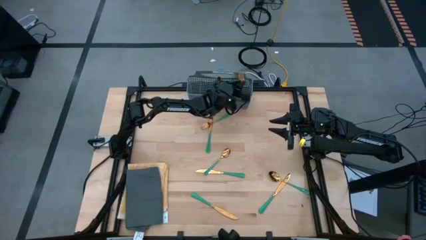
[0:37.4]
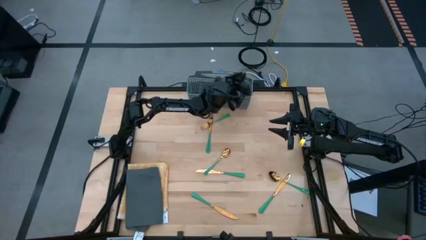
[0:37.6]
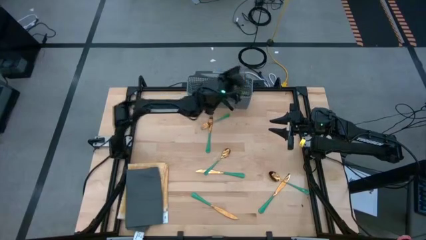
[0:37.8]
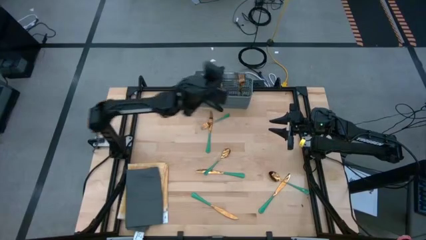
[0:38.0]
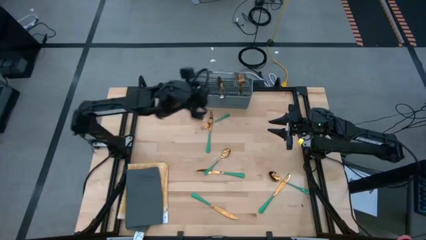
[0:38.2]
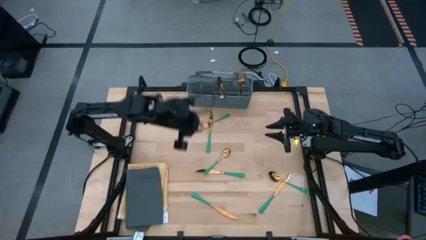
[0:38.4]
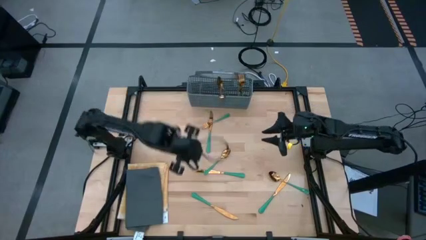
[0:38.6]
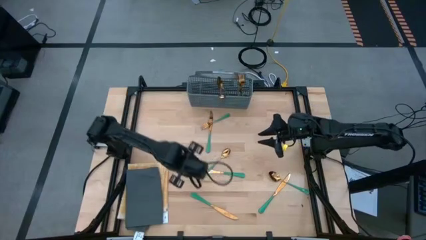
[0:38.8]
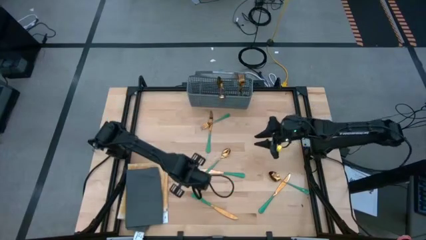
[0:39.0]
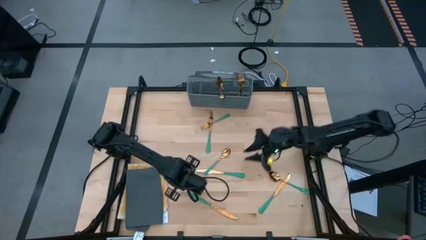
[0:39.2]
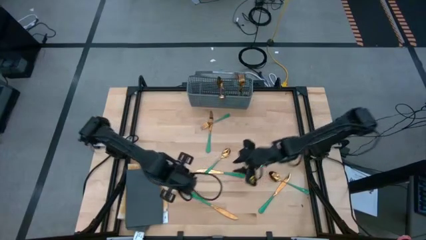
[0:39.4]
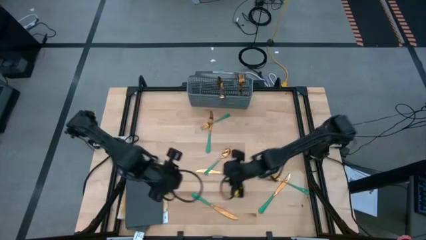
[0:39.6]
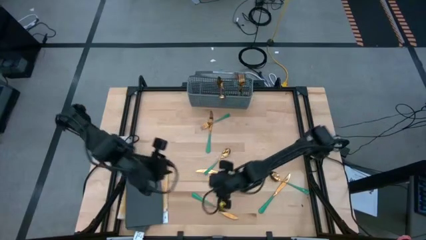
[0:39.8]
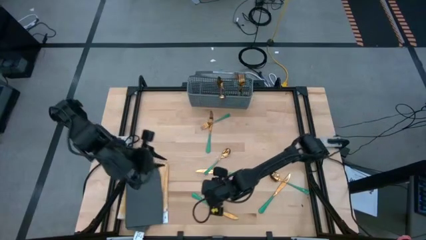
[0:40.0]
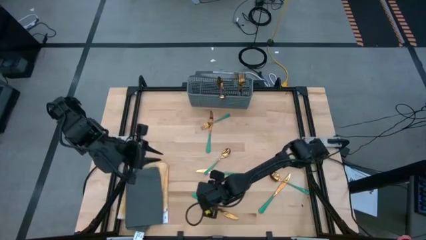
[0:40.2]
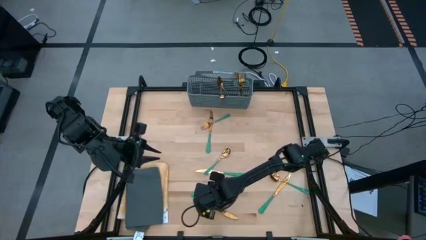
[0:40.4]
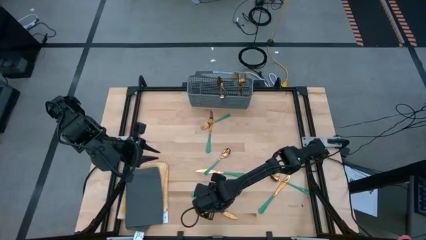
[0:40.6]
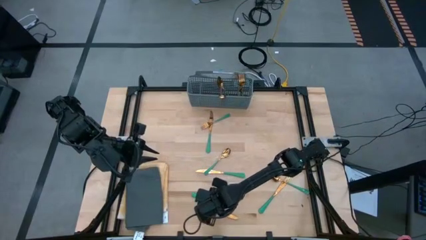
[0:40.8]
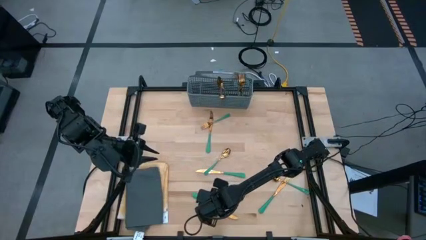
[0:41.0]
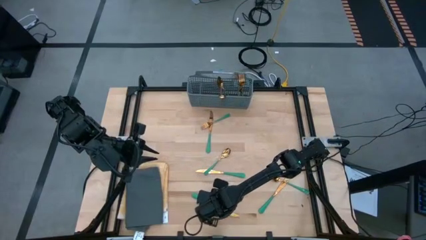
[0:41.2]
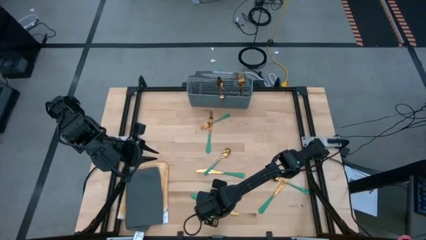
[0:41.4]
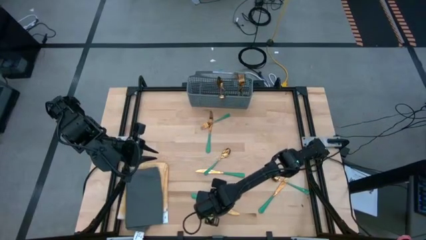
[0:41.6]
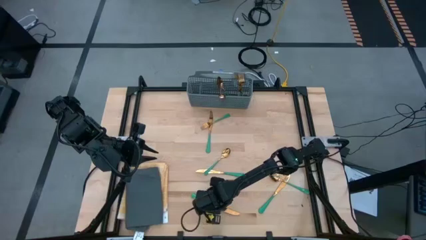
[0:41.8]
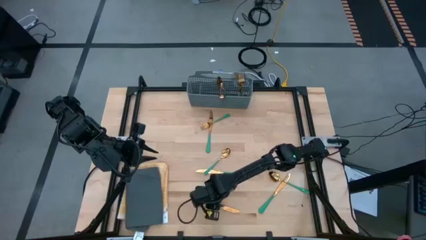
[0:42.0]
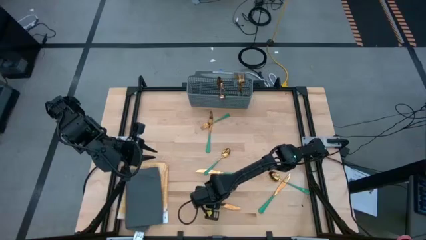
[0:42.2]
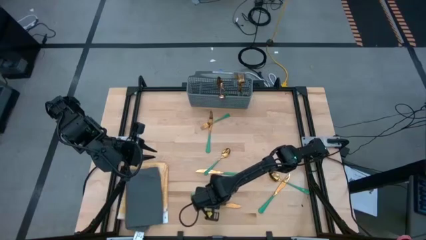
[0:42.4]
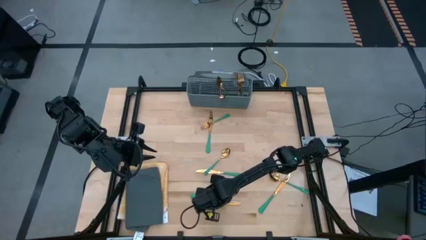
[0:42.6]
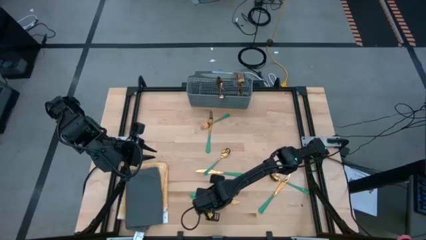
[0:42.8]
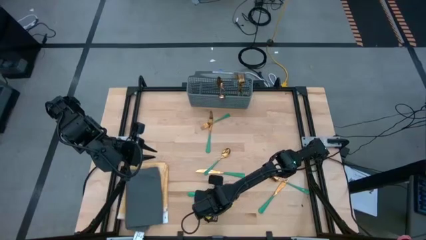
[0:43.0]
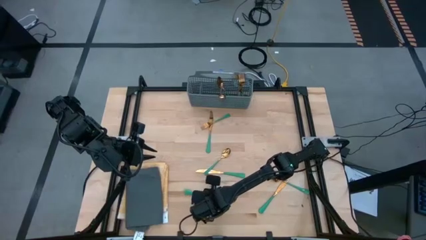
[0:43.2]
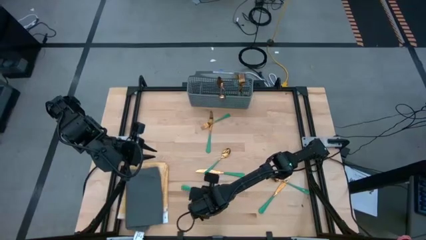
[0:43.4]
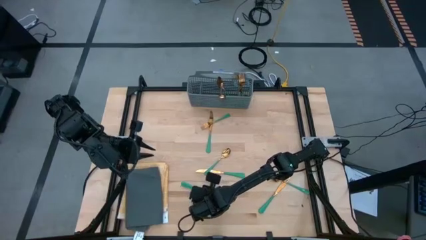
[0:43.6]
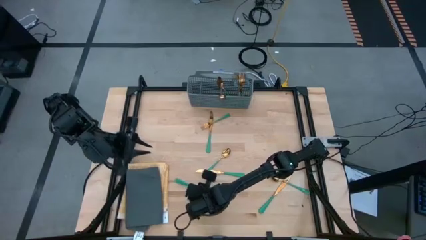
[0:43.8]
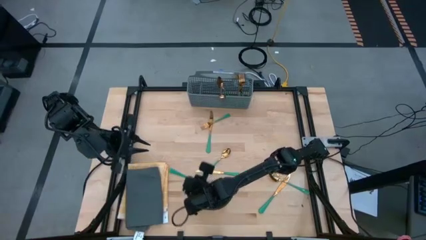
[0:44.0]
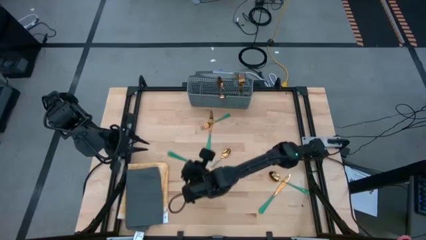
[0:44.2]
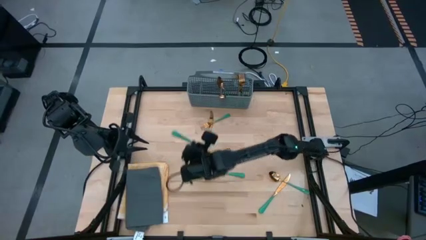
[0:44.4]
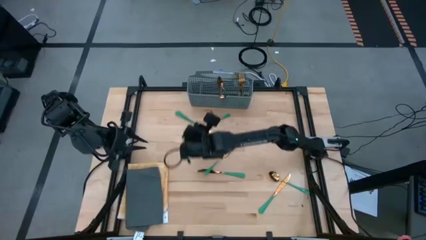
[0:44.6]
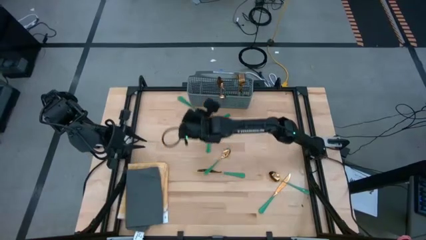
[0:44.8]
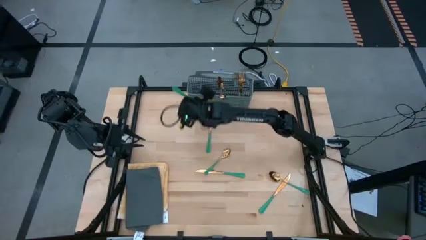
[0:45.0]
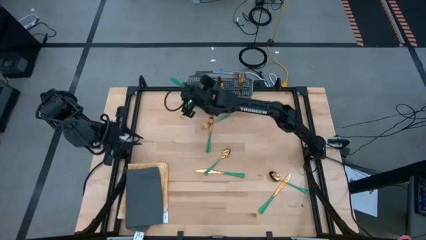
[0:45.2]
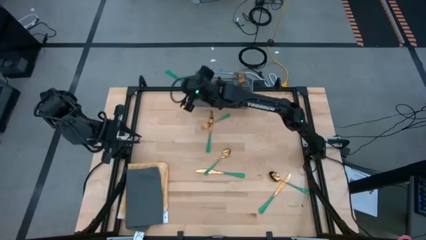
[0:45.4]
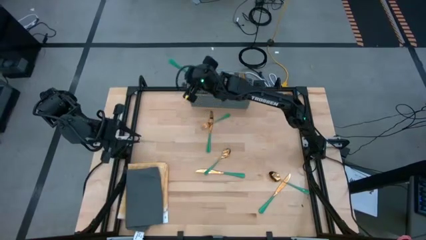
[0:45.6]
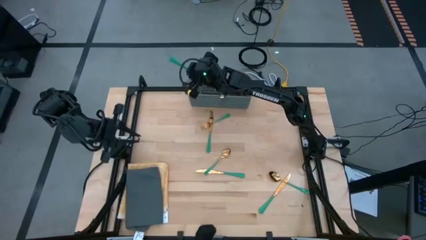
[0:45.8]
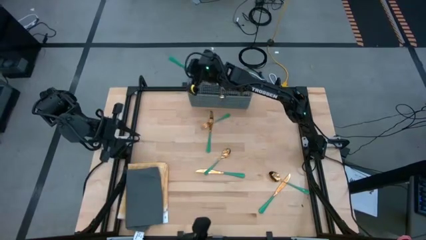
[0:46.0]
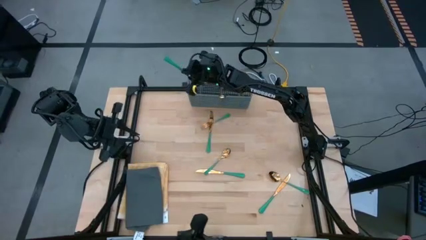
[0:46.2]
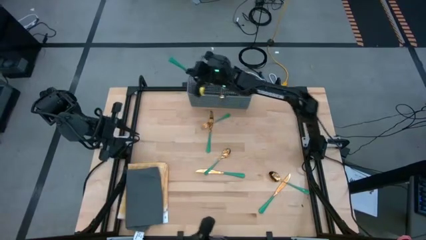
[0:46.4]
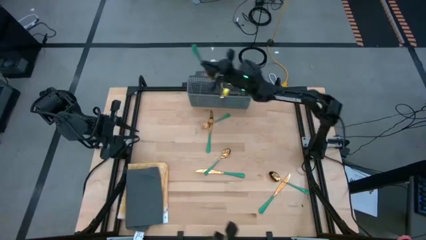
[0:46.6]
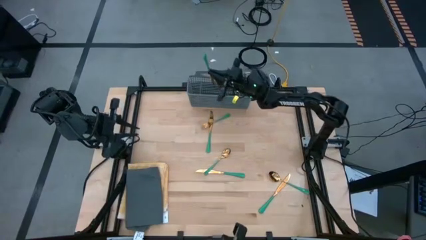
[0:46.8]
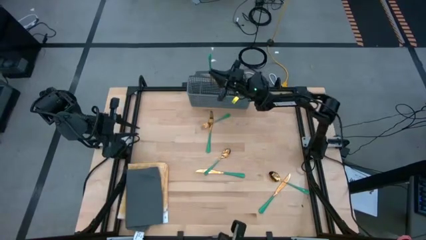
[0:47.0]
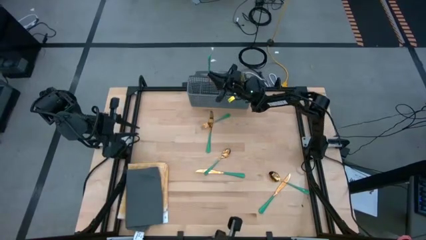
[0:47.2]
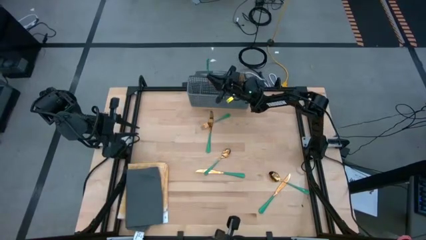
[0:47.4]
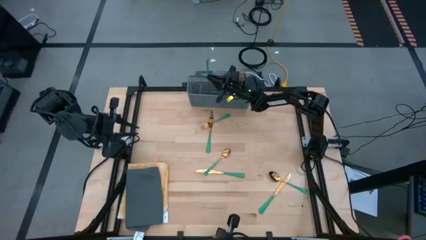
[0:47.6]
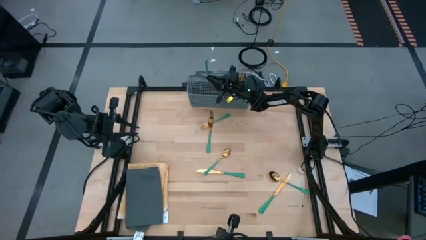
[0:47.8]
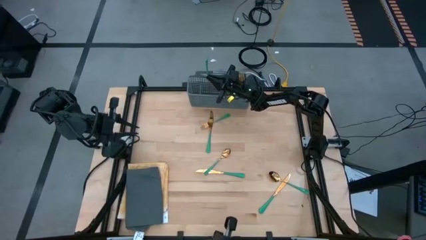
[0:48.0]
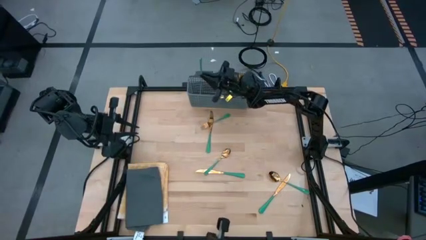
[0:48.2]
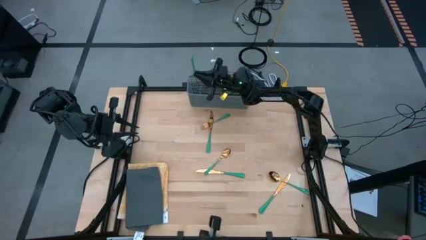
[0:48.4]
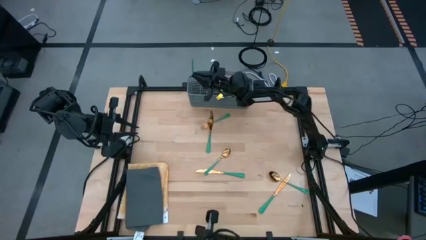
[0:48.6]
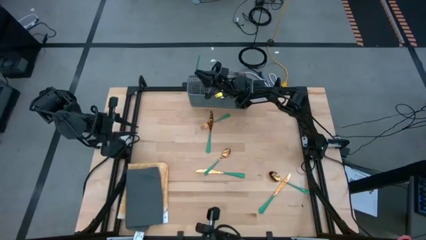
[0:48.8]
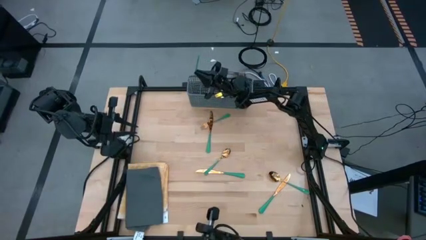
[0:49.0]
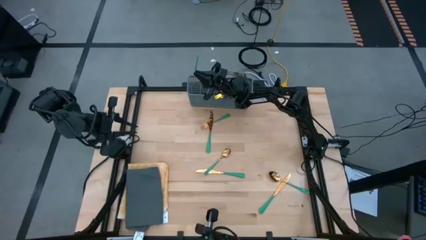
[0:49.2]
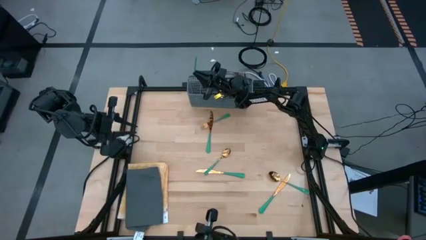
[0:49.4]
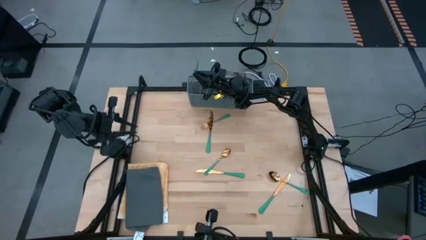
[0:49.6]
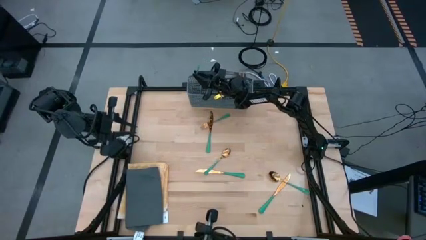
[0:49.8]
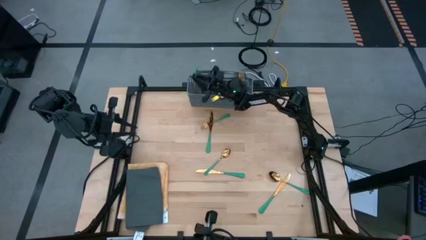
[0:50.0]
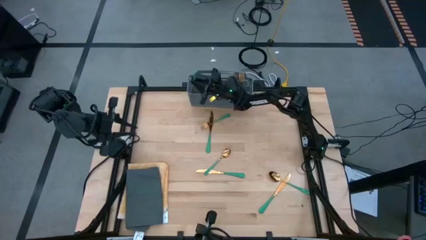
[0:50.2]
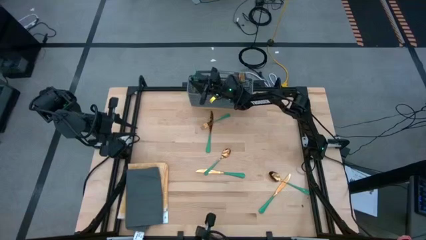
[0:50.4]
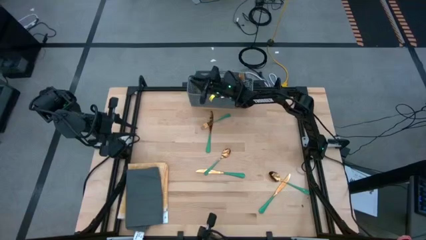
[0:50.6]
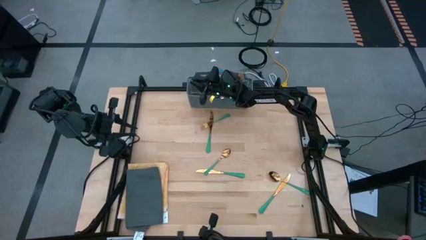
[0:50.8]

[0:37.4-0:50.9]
Task: Sort silverware
Put the green knife into the gray silverware holder

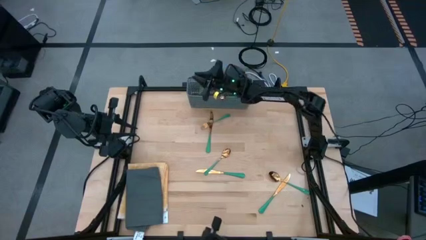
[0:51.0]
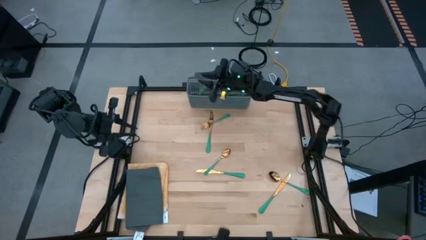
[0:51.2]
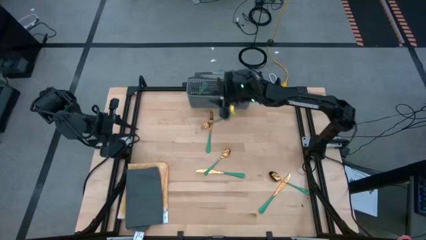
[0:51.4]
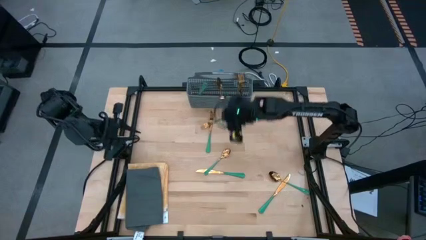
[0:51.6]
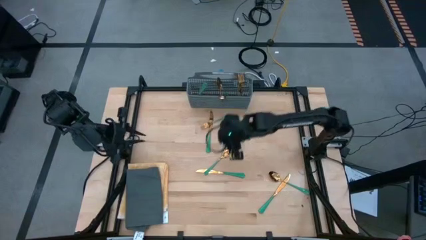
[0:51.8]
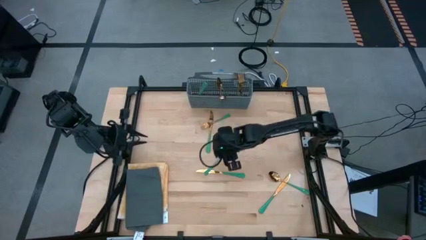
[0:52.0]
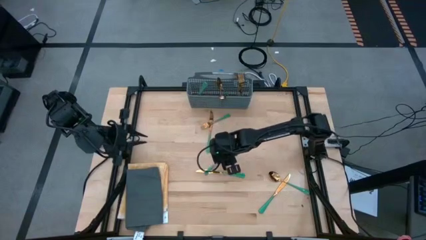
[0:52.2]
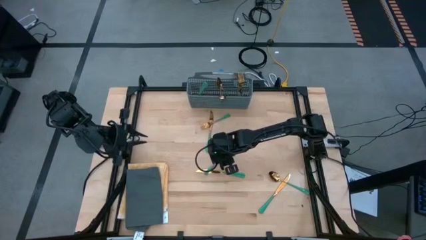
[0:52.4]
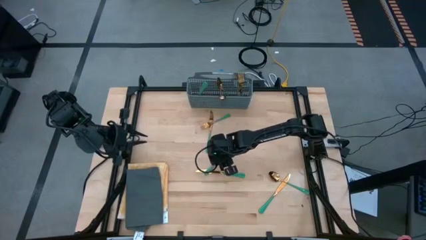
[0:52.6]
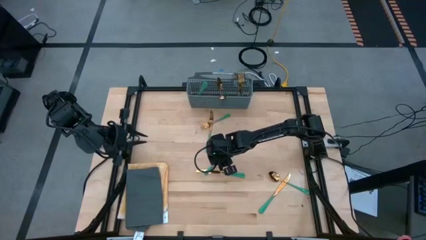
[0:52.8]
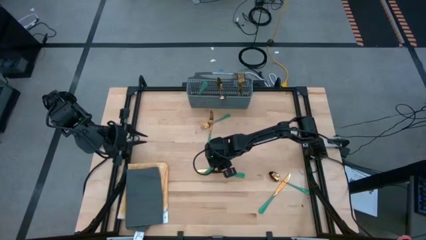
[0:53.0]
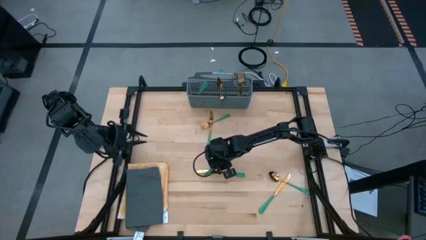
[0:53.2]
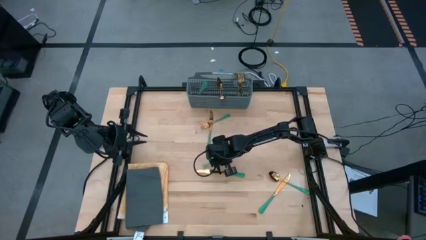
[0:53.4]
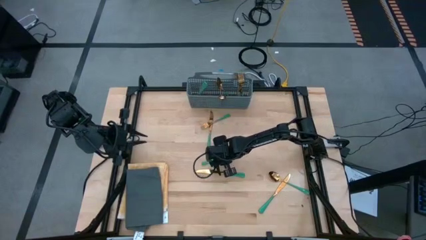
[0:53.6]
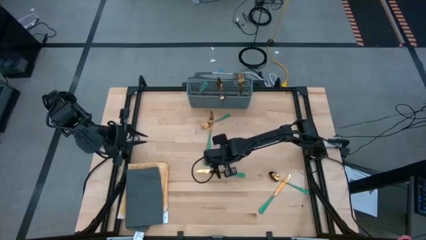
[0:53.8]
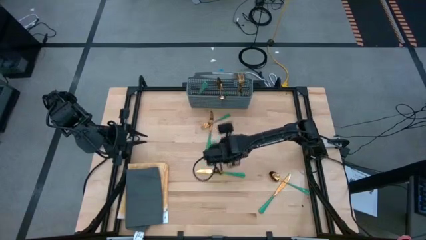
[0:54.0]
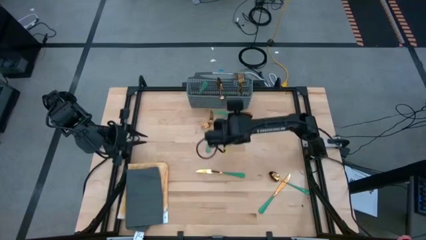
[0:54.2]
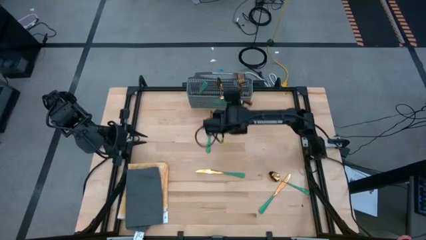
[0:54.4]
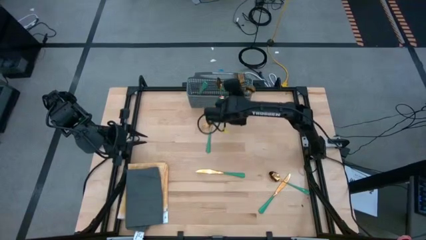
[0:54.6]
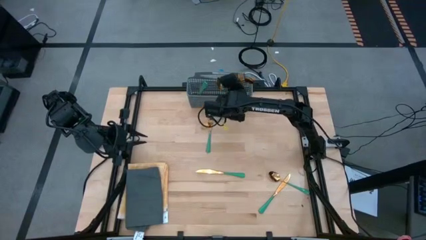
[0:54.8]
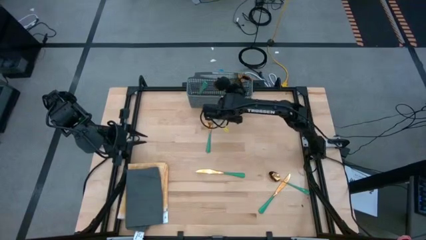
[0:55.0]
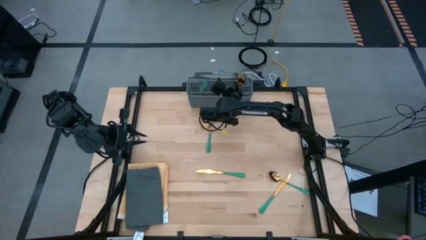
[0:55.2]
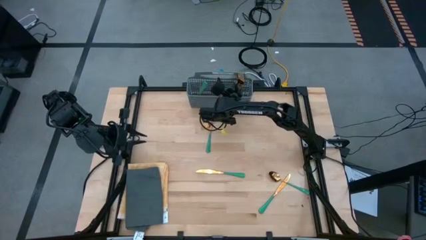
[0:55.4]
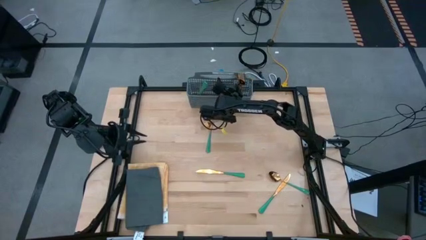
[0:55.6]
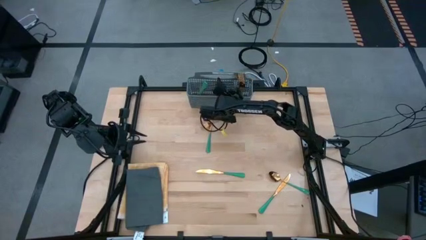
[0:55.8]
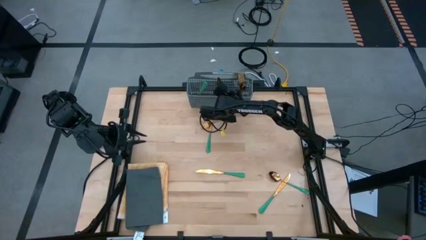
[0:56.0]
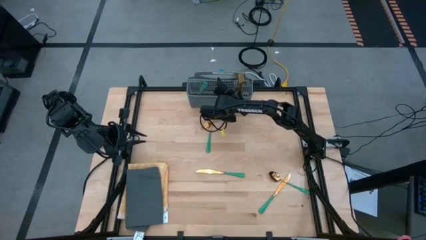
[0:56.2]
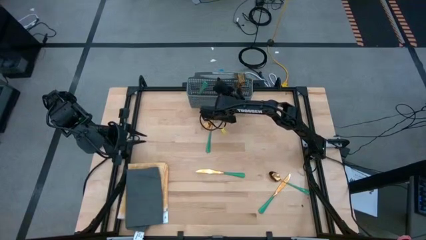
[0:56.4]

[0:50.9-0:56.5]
Put the green spoon into the gray silverware holder
